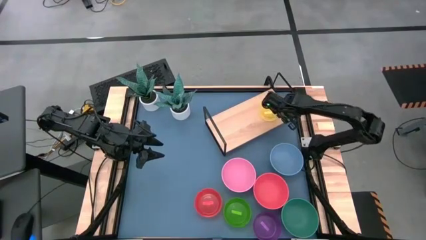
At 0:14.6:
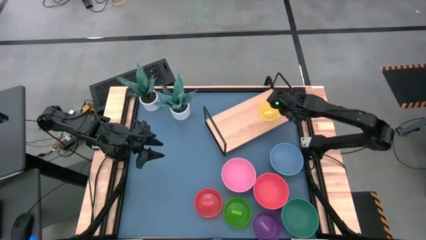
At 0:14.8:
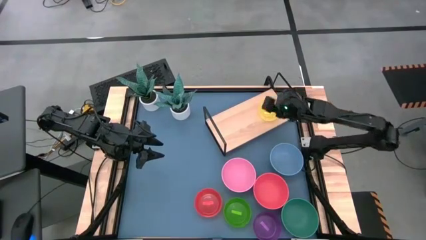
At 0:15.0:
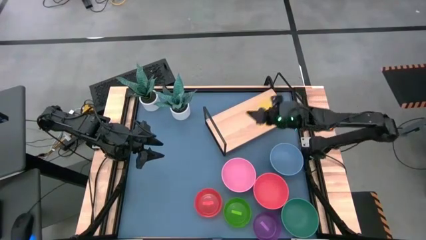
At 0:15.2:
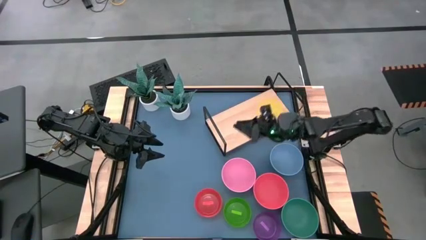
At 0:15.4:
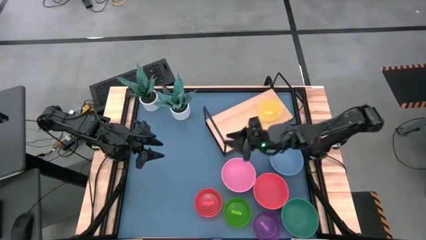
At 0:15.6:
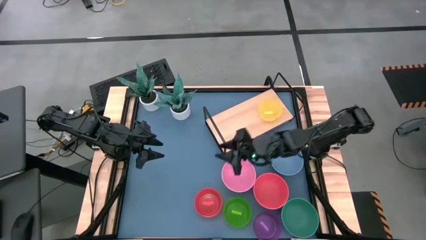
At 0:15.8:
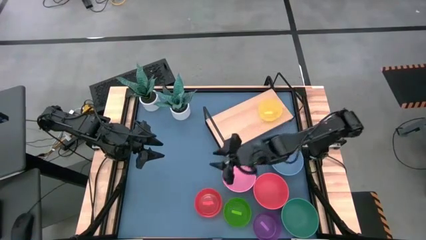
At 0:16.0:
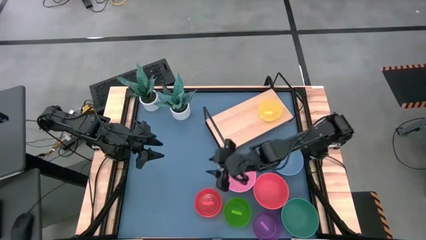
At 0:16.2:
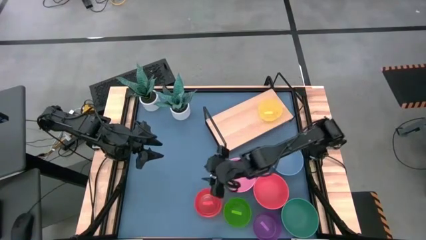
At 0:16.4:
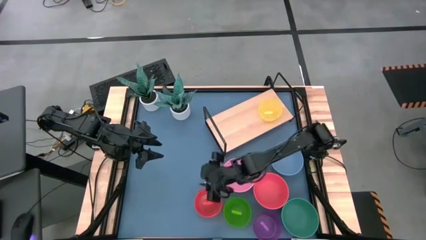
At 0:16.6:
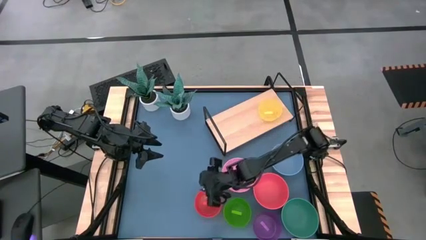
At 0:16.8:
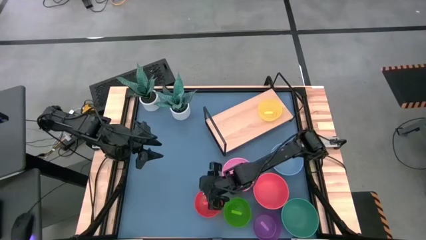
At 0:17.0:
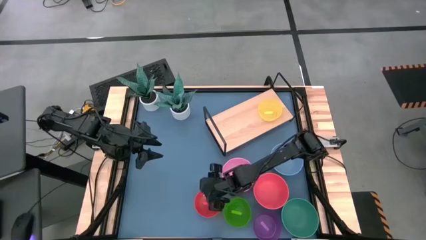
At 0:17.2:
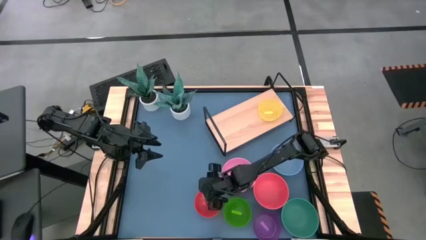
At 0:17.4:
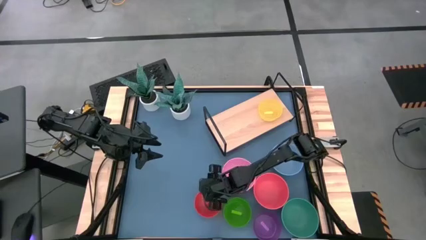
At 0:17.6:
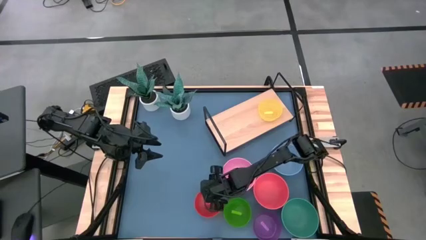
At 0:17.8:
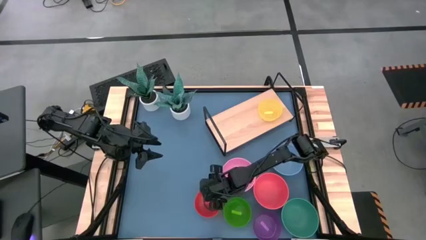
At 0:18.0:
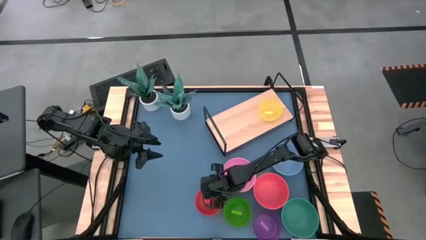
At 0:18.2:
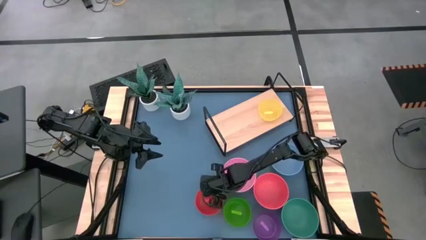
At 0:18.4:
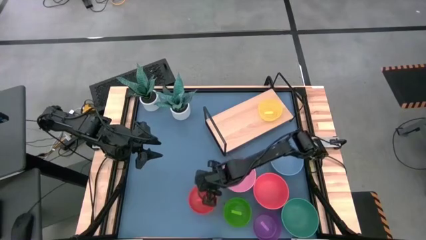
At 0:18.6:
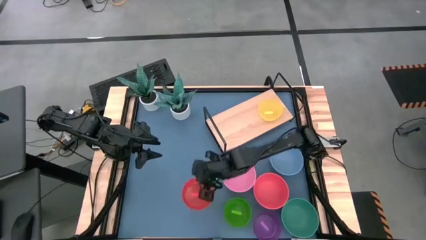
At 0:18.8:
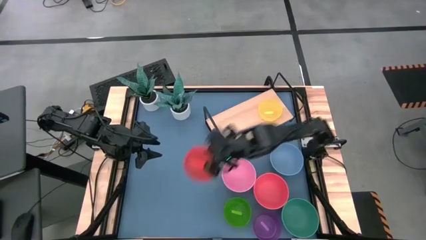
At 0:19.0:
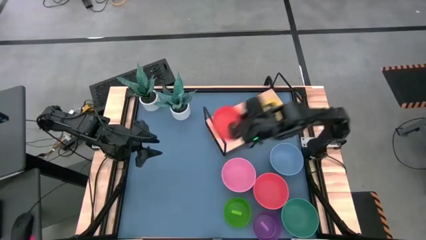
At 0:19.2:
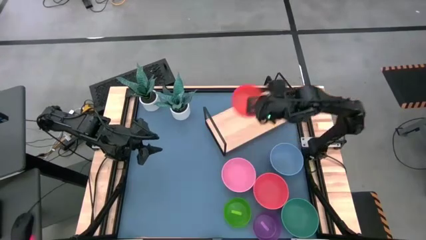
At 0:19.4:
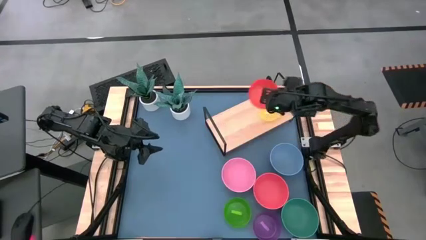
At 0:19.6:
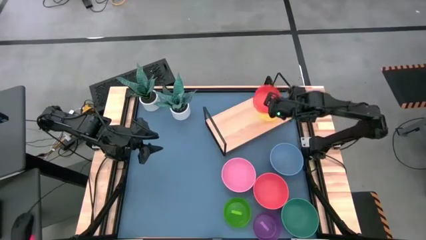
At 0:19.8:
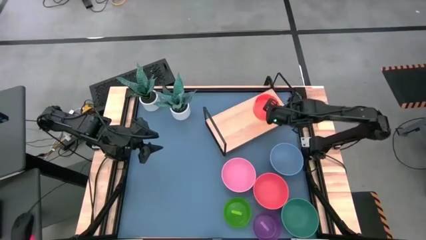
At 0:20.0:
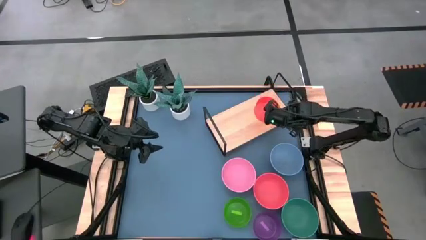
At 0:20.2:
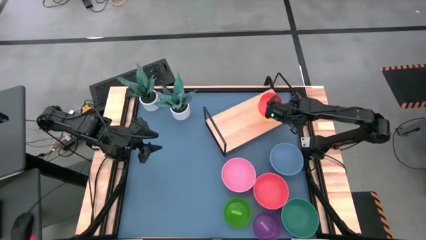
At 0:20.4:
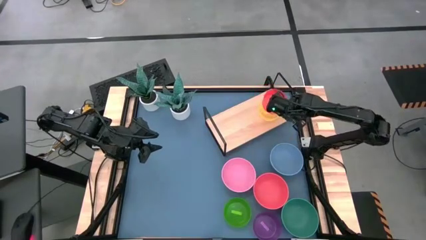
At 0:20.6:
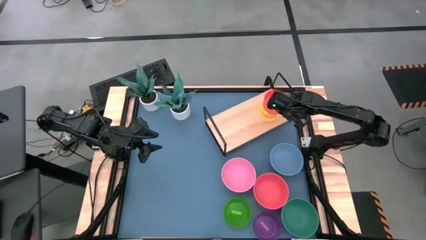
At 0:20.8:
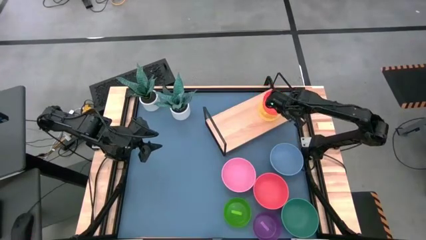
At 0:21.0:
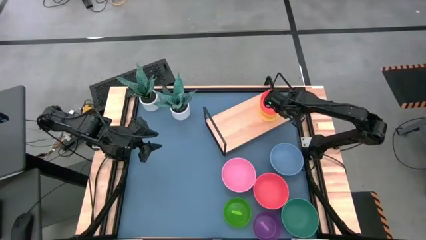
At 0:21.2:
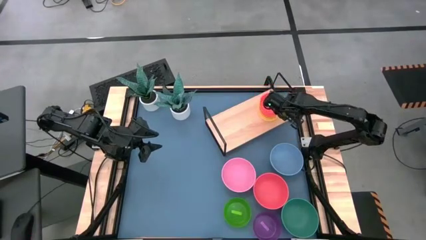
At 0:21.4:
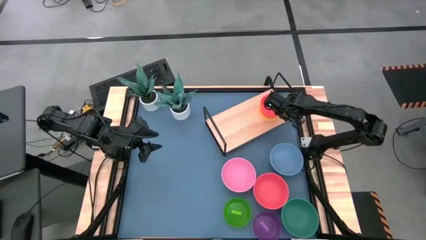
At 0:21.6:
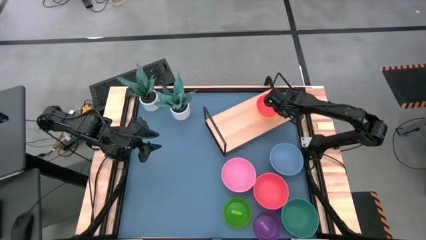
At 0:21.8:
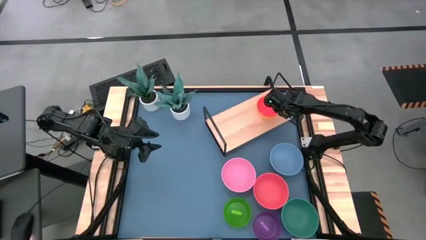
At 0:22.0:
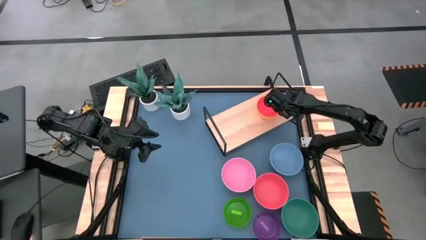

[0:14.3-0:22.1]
Task: Place and stack bowls onto a shelf
Stack the small orange bowl on top of the small yellow bowl on the shelf

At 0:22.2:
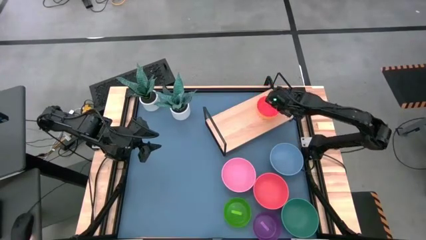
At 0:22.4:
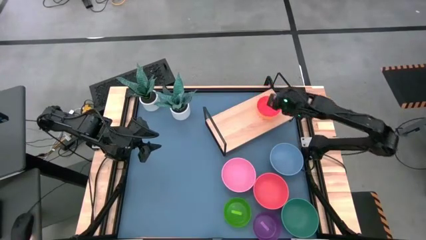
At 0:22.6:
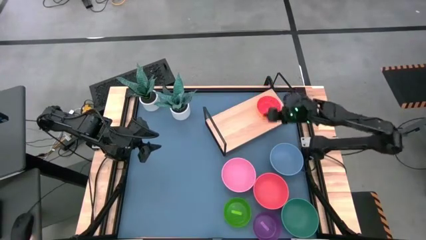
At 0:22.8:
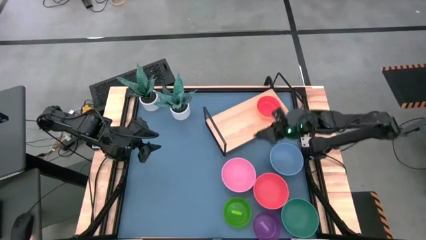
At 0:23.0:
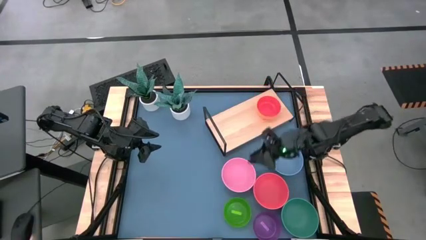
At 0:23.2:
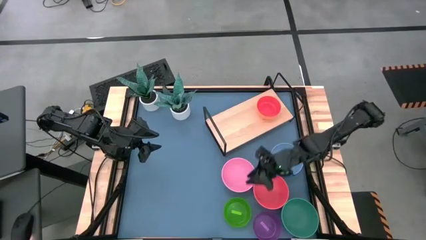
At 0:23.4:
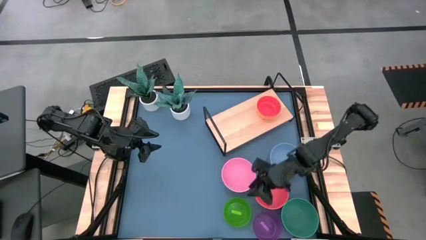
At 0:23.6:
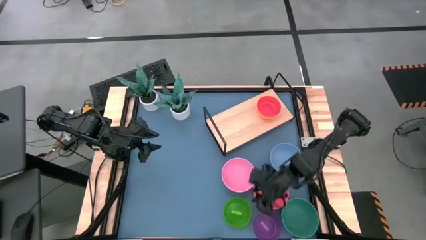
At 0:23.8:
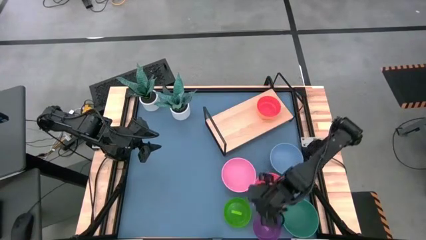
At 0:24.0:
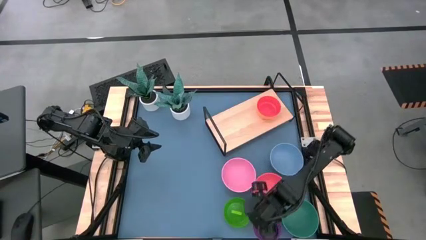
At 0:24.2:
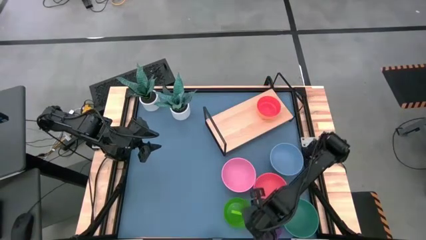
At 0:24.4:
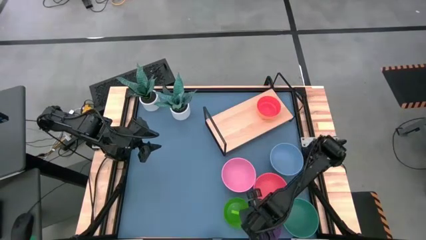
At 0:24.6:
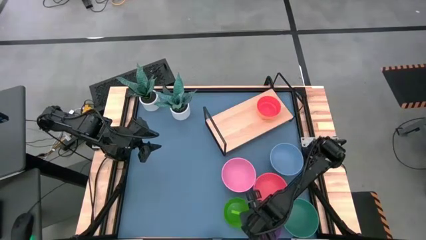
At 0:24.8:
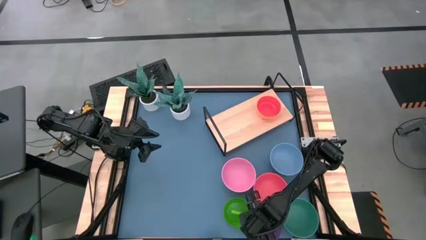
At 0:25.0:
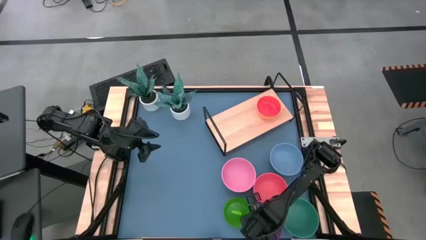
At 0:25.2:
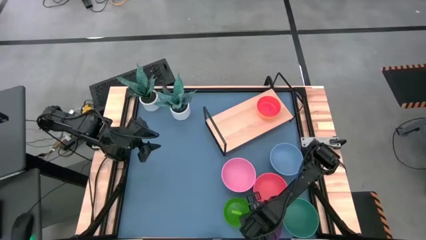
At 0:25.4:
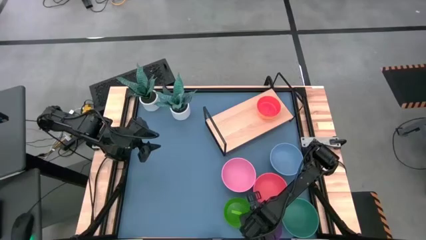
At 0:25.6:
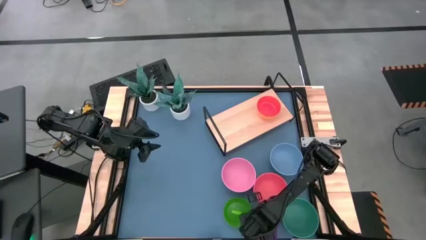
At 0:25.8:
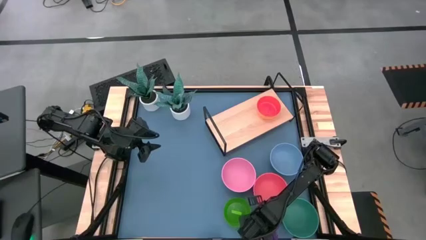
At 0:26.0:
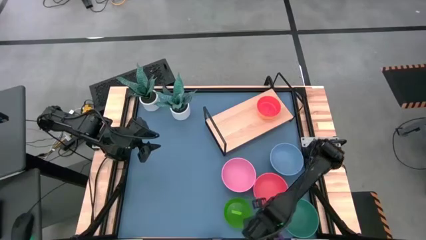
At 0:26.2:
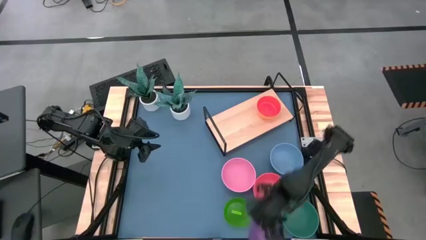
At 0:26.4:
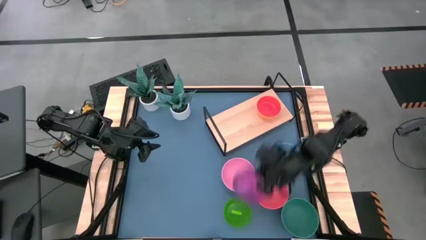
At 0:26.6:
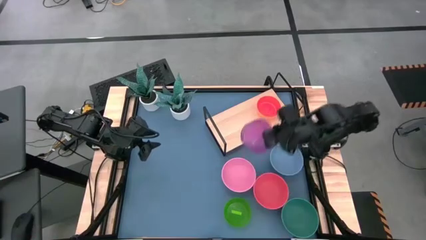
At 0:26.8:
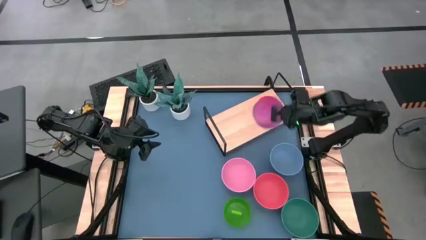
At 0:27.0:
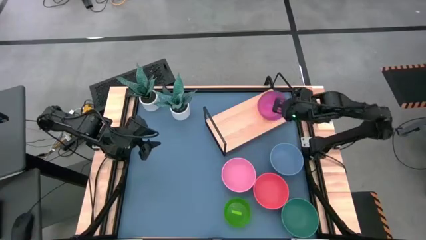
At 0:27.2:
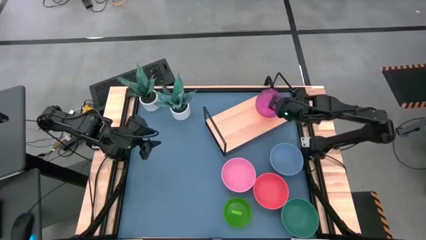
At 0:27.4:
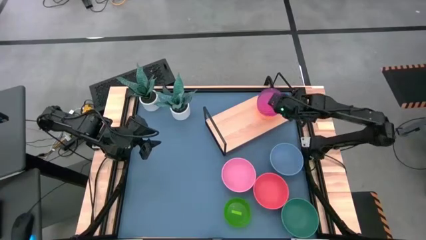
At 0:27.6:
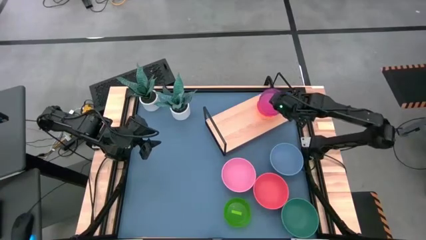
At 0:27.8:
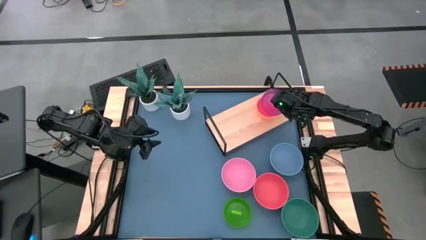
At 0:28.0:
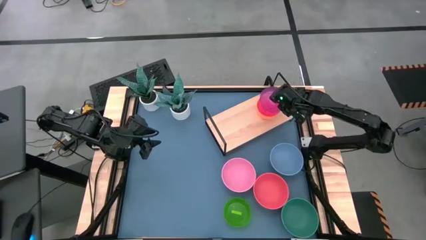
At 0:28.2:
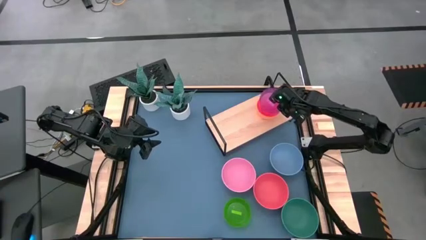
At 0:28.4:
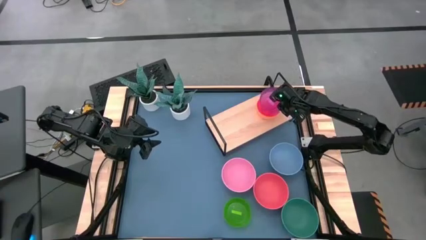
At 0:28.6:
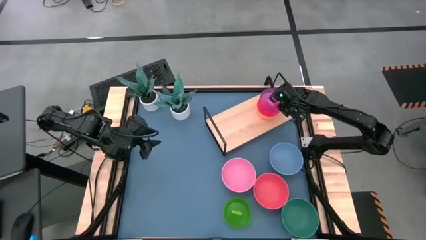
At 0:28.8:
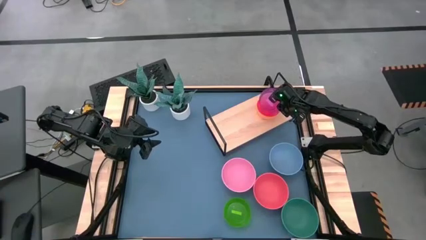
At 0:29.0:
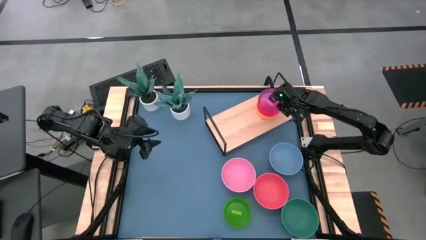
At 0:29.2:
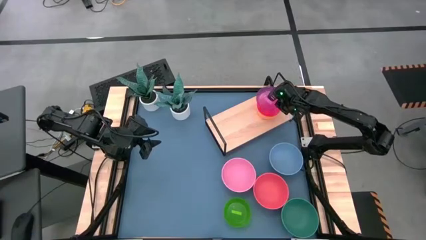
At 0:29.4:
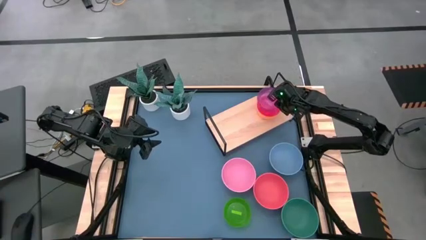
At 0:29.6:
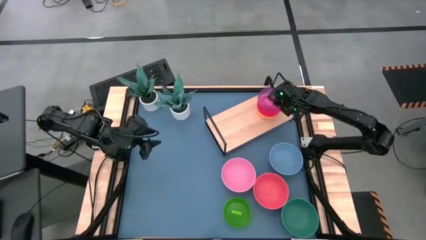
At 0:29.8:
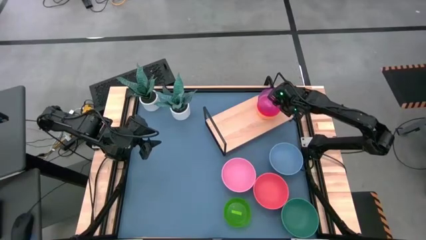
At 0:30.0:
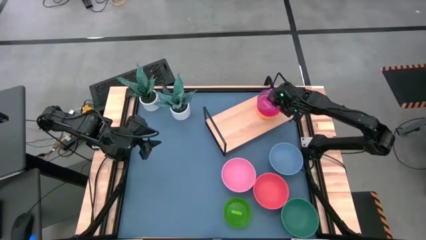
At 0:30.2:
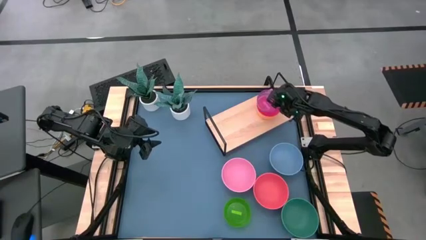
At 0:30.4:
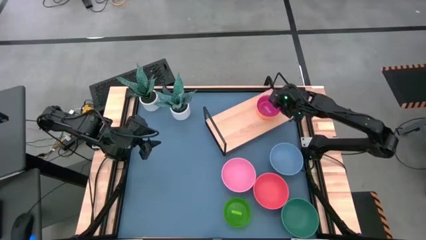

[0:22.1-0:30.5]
Stack the small purple bowl on top of the small orange bowl on the shelf

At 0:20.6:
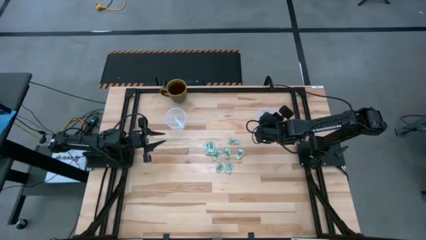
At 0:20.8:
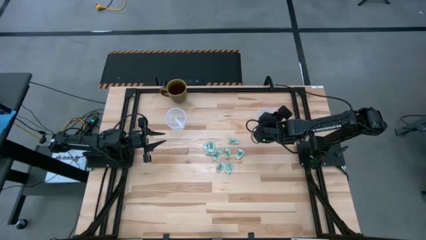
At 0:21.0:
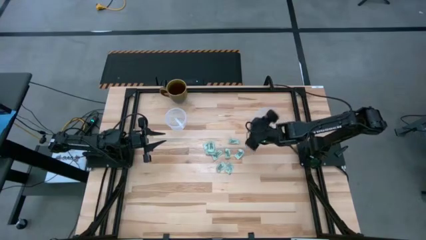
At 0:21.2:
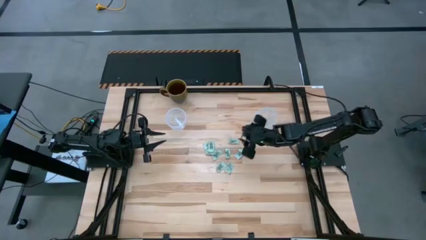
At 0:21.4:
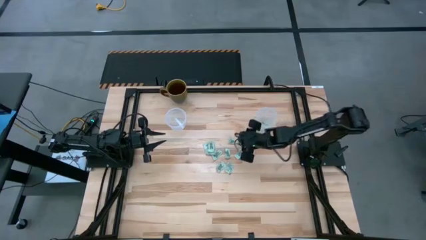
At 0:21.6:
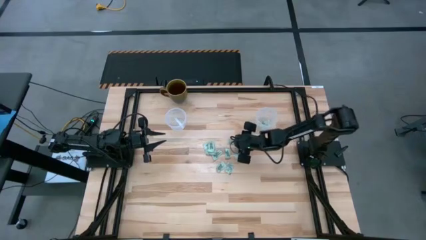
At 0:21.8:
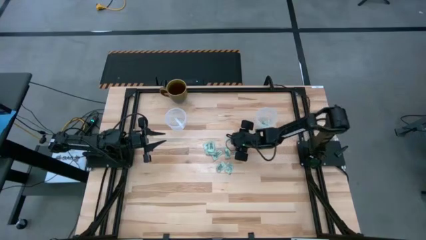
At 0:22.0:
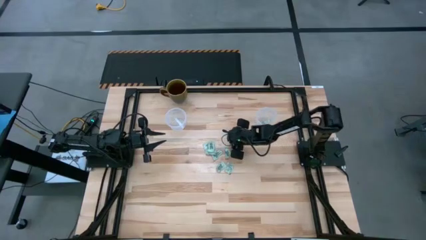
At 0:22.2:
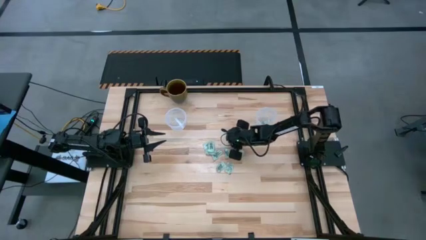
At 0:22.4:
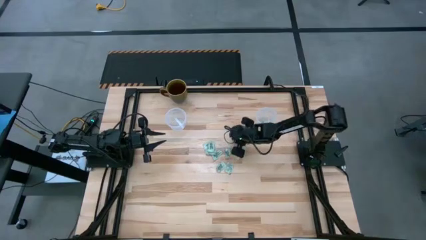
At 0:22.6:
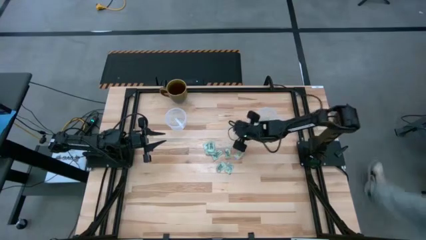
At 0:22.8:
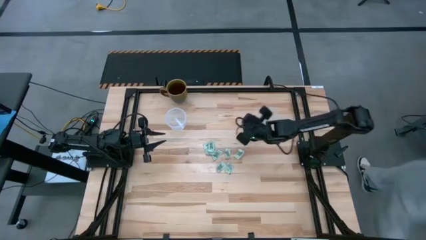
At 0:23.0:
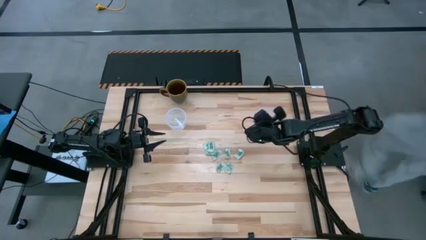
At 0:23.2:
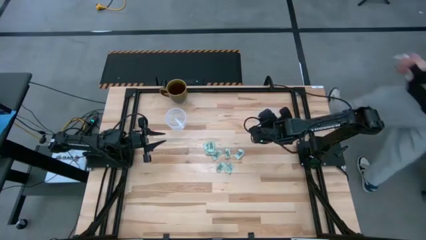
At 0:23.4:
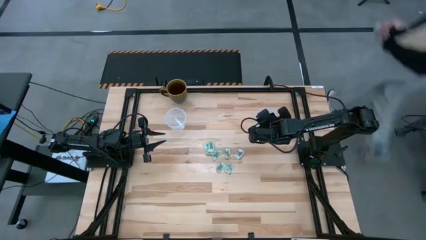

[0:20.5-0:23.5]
Task: Pick and place items into bin
Put the stevia packet into the right transparent bin
